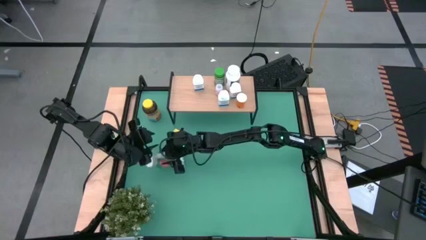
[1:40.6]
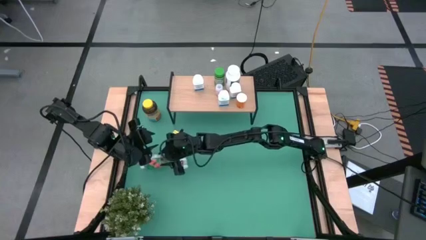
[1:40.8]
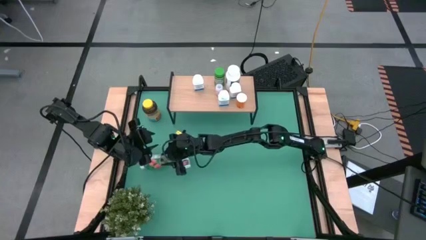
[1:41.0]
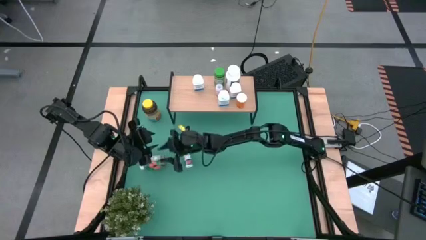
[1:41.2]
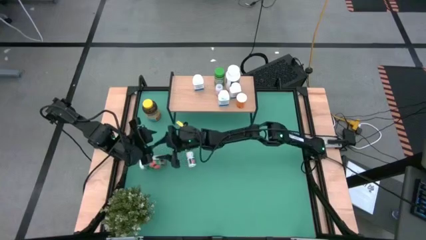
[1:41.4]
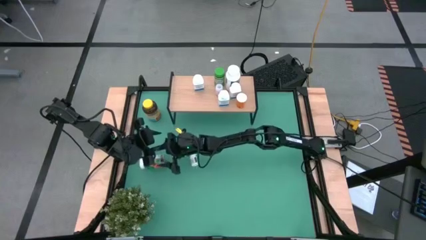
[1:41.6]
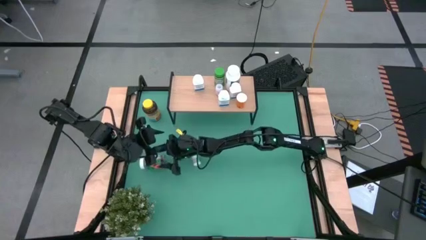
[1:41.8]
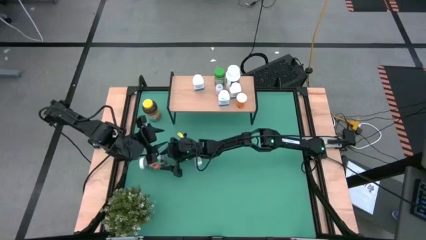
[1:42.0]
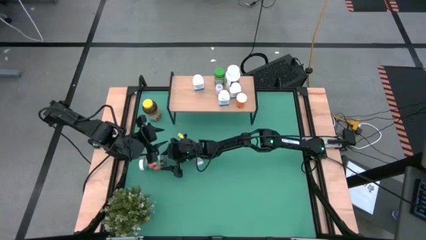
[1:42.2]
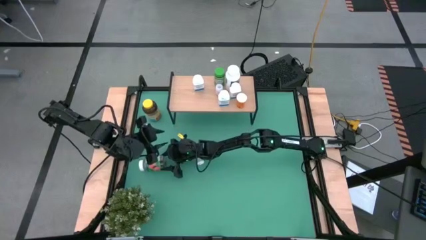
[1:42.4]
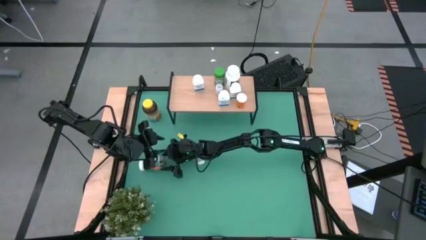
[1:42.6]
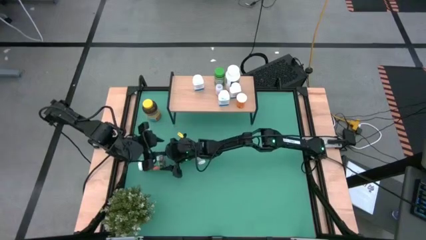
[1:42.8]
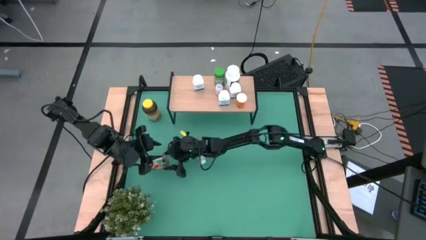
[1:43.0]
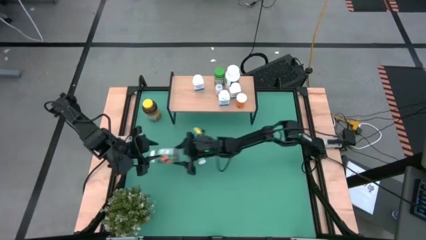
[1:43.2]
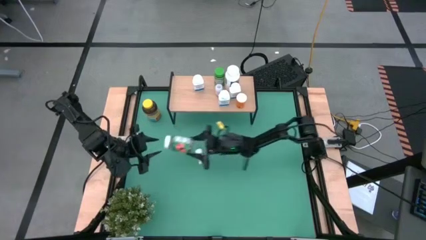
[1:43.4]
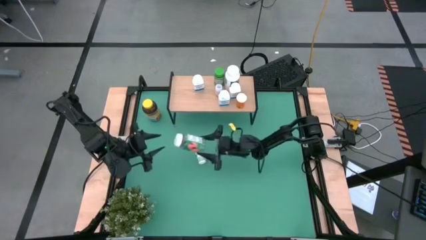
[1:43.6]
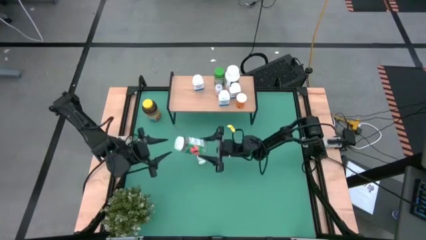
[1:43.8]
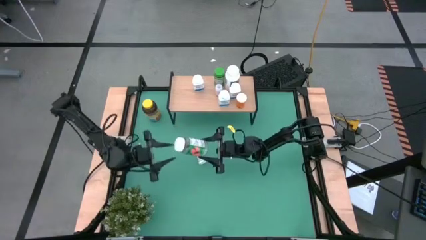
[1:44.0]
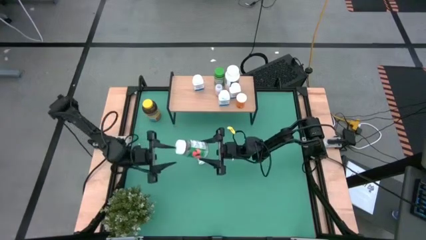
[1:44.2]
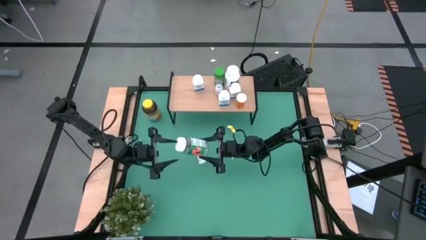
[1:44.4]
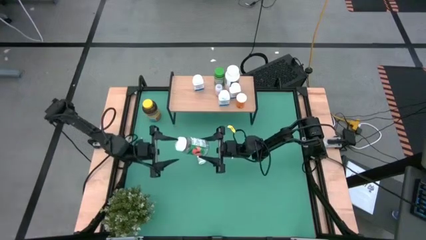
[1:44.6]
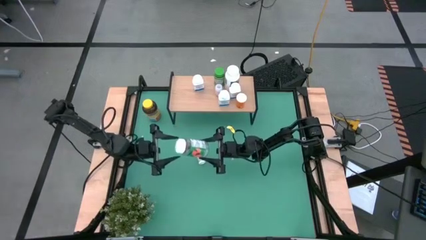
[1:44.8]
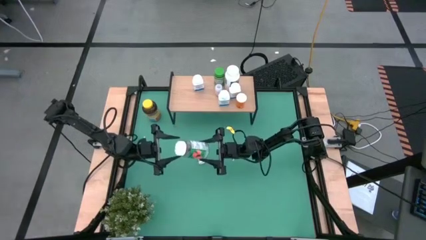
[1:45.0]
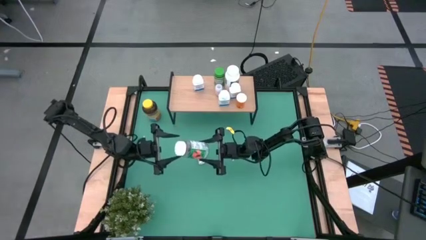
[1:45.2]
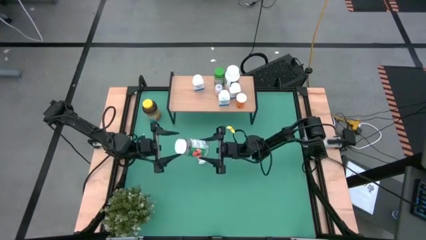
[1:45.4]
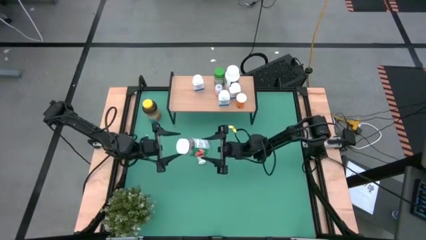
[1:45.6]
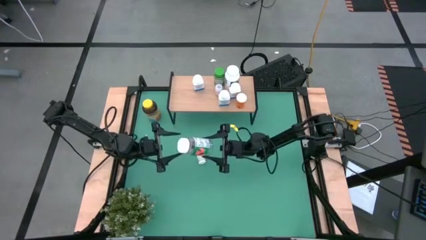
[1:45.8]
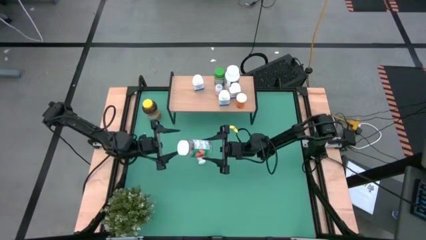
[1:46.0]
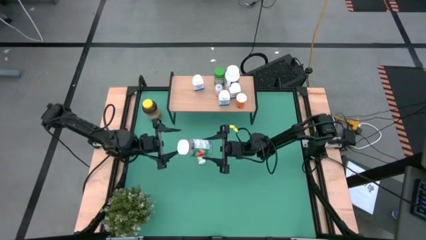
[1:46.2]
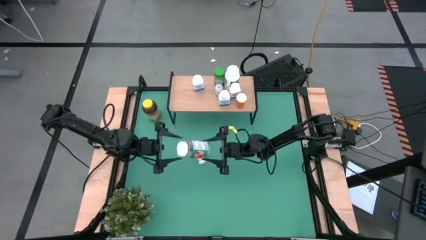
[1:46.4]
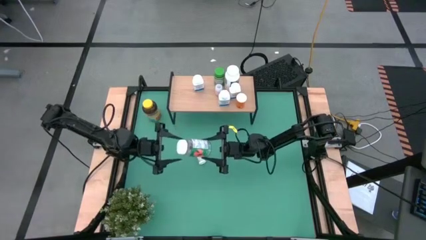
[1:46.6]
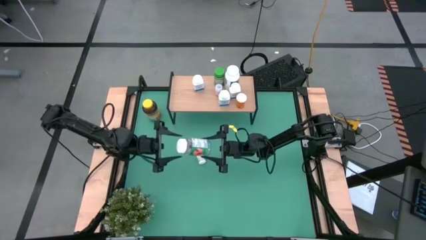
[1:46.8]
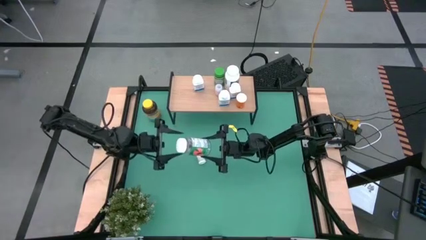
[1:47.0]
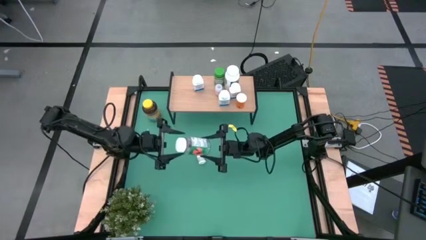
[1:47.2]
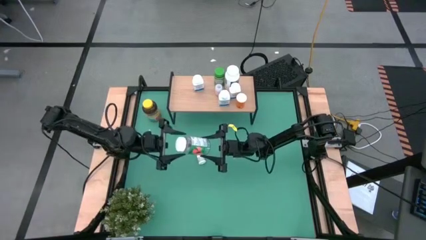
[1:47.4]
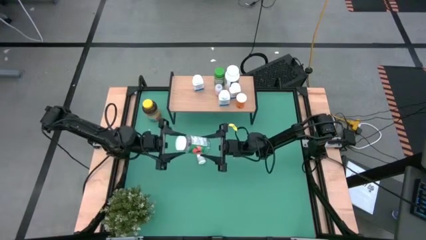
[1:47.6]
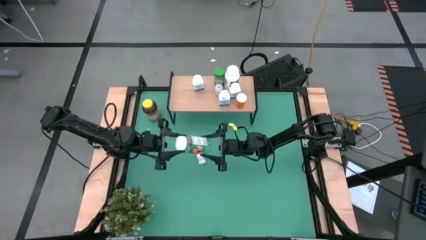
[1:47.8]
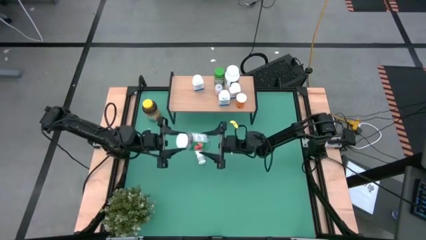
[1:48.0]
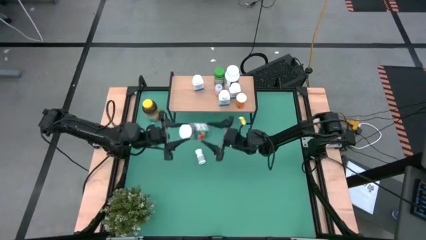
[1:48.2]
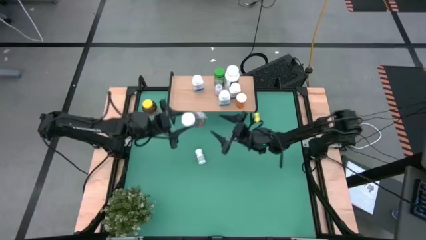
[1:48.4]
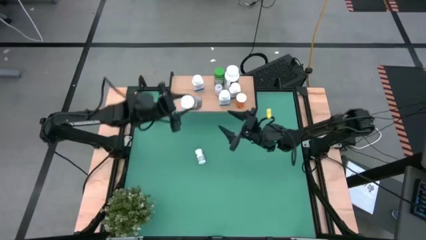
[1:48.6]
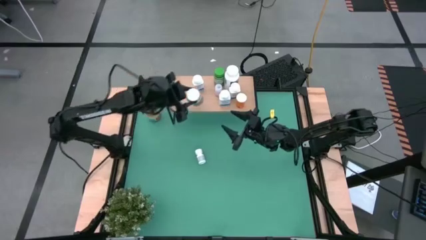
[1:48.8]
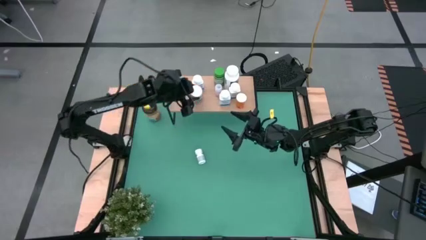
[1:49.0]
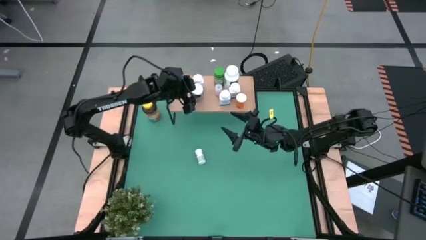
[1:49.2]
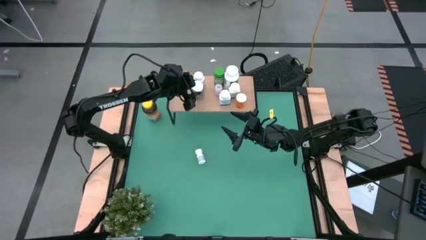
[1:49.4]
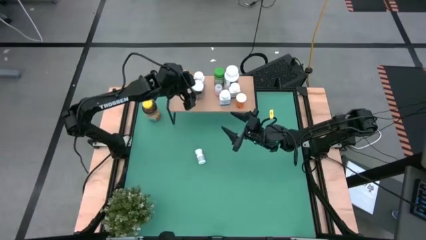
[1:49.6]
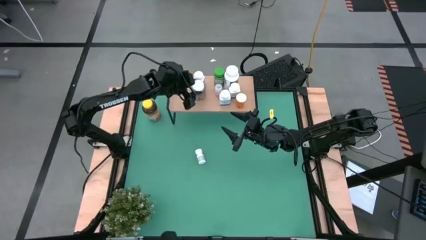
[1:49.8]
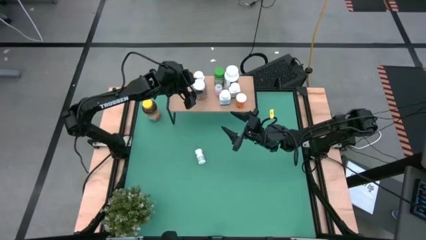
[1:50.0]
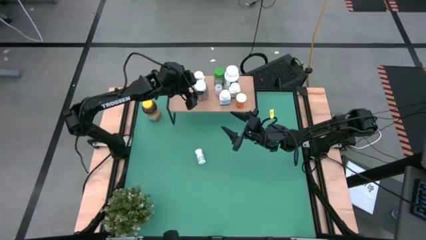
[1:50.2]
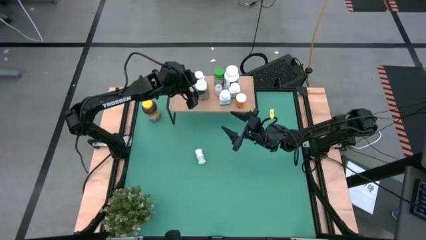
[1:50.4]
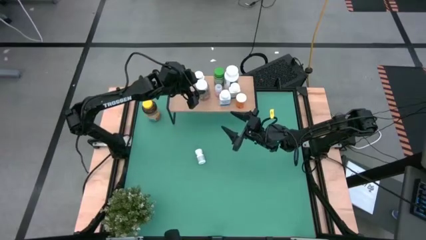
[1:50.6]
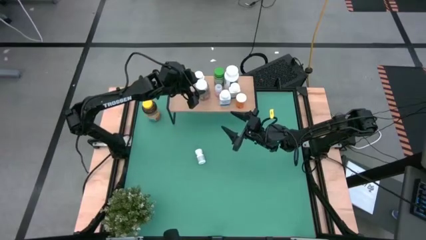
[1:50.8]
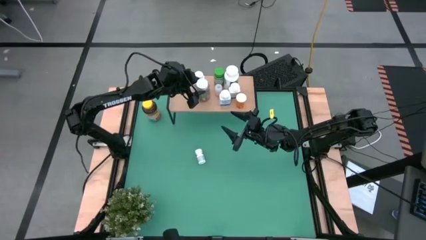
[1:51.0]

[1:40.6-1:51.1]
Task: Pick and place medicine bottles onto shelf by color
Put the white green medicine bottle on the shelf

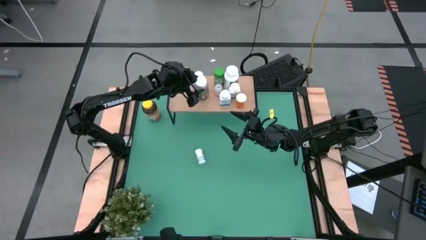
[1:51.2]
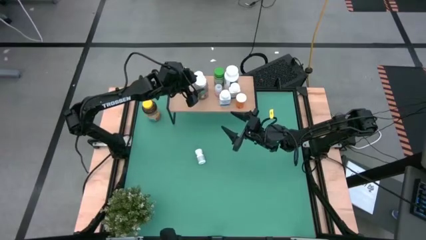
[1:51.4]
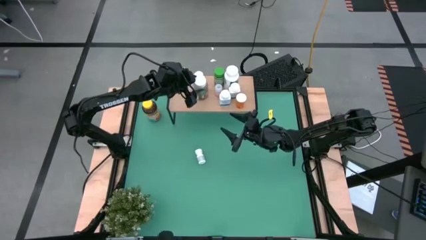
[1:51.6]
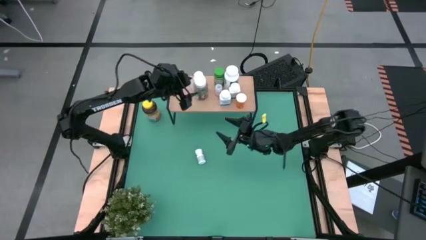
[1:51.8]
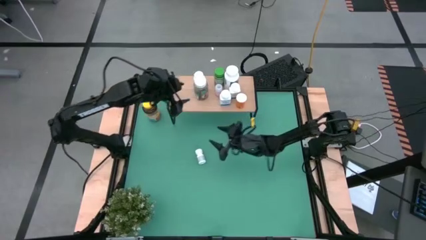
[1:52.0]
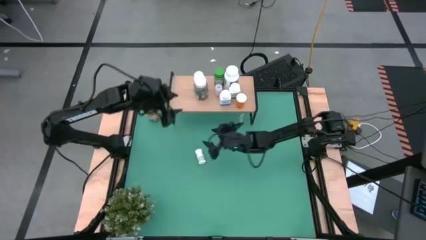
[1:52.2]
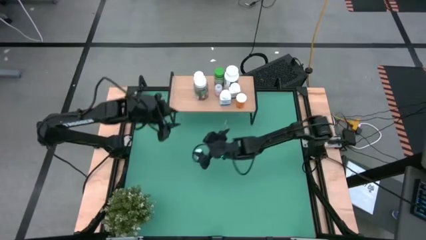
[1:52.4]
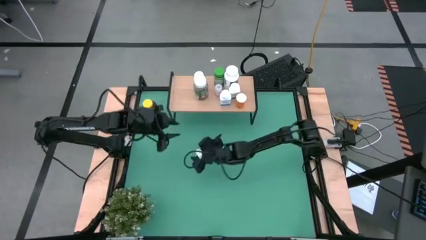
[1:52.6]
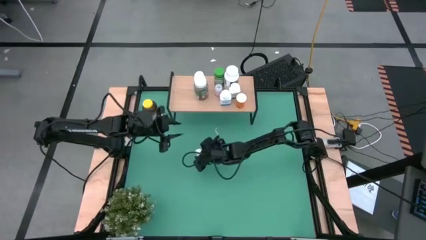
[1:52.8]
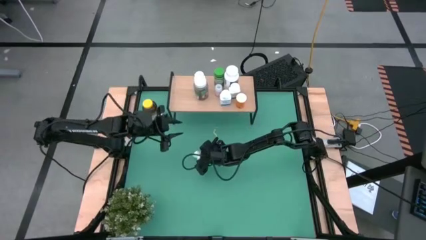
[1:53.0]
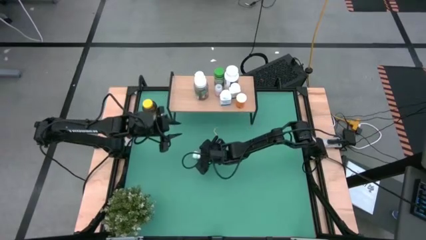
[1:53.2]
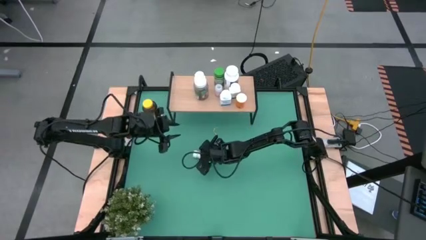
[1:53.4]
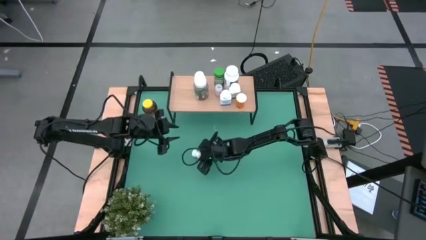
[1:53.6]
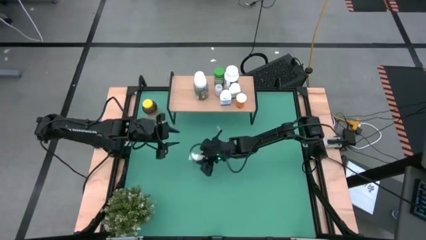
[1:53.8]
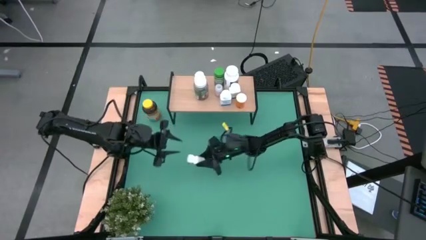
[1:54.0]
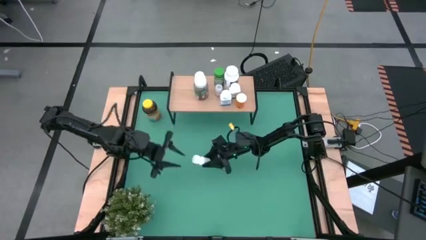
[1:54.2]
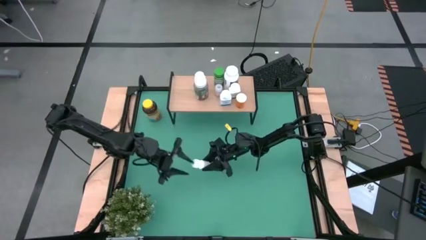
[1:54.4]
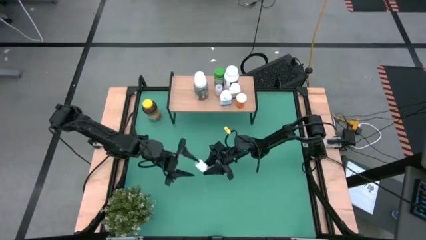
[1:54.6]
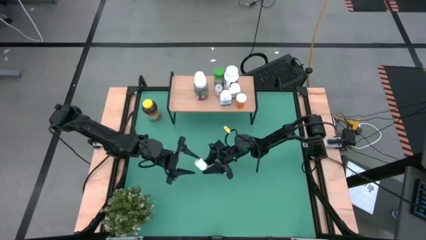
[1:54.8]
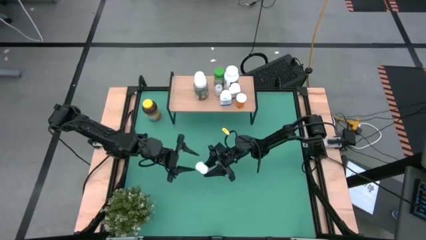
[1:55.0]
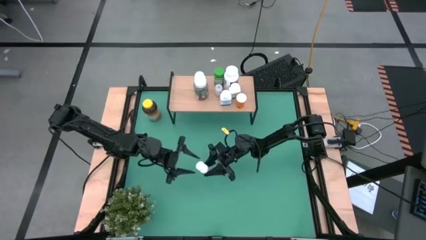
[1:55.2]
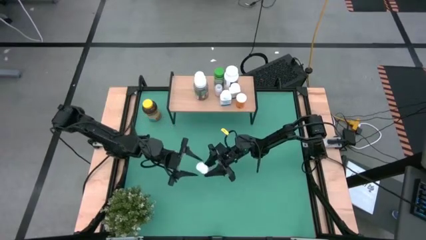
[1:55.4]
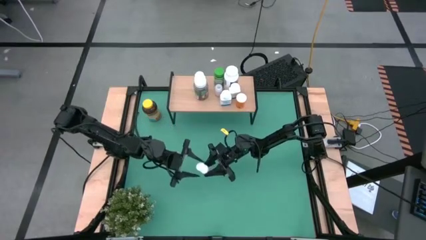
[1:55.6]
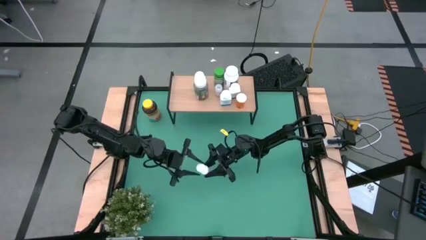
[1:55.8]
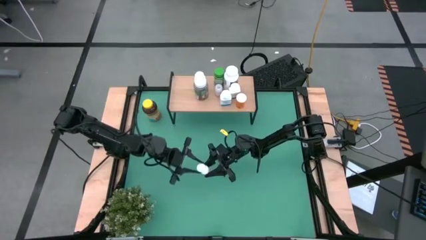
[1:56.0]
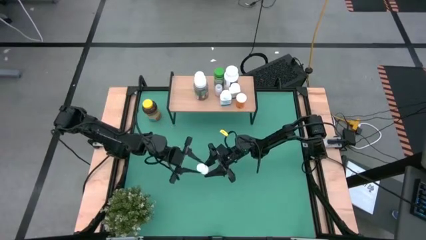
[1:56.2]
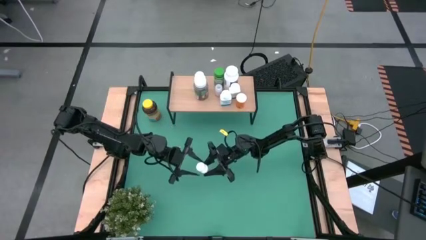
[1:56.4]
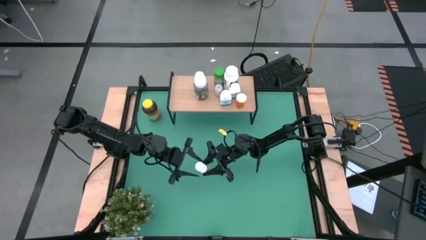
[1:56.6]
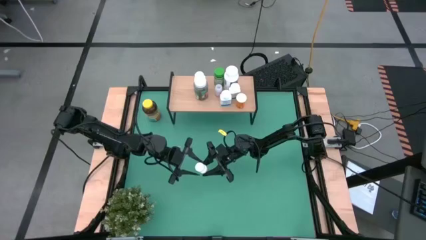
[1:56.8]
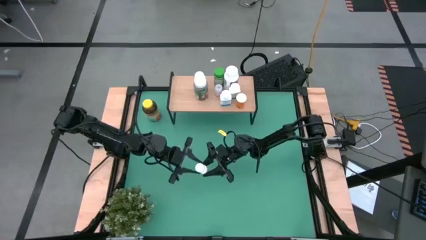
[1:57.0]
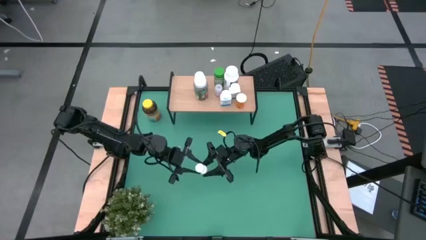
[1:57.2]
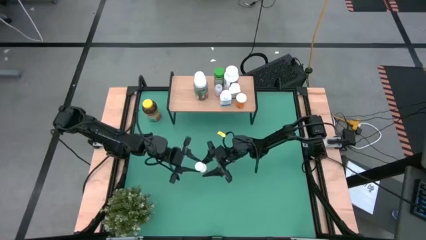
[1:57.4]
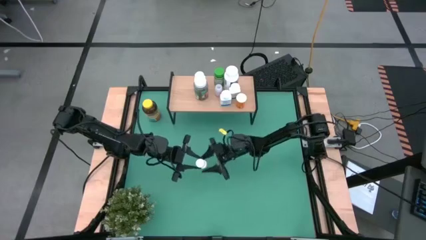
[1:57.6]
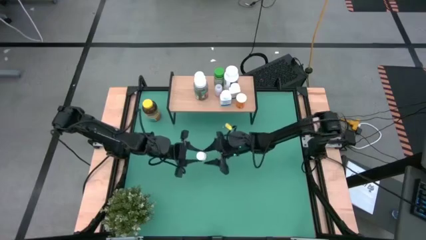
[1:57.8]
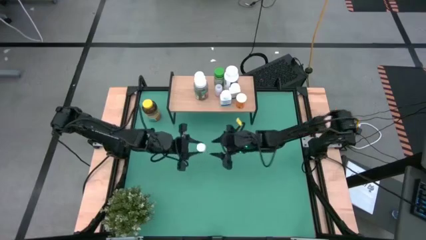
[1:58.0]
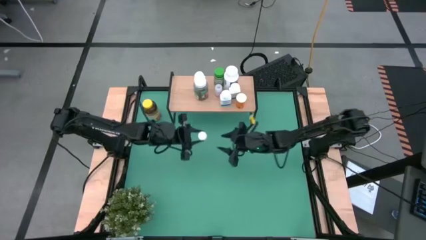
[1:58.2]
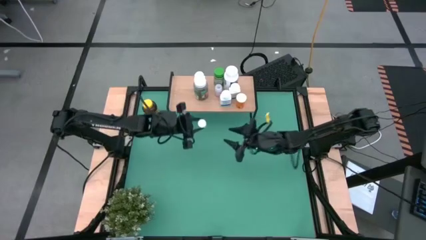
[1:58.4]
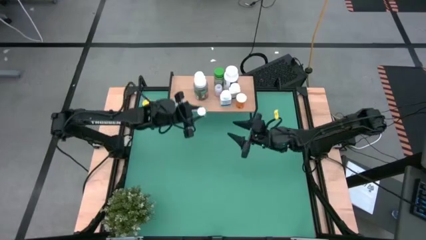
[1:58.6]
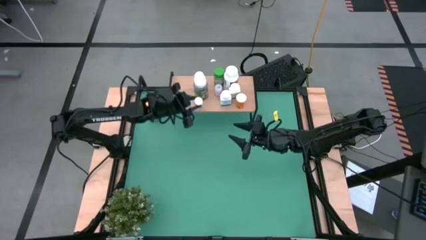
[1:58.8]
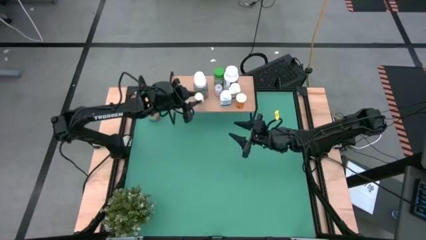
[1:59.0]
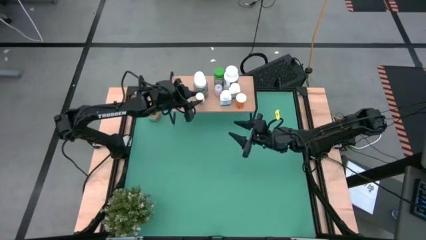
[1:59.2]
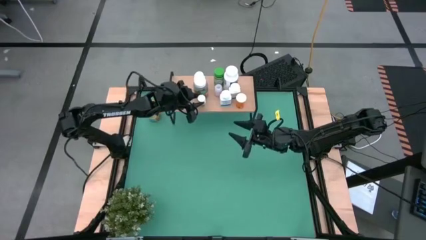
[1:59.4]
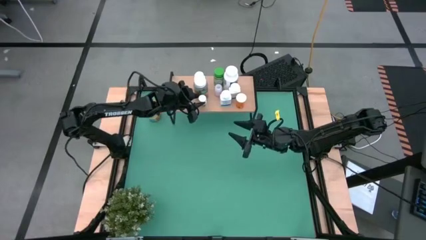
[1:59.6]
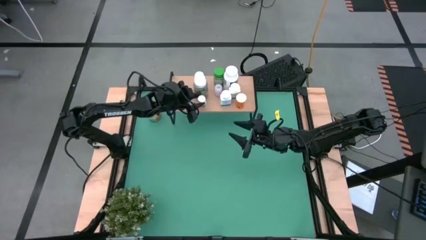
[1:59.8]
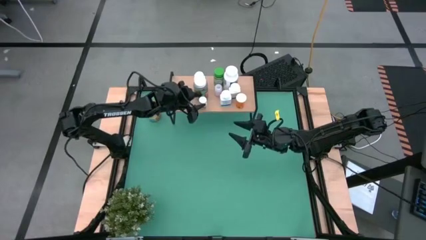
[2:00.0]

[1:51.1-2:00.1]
Put the white medicine bottle on the shelf
